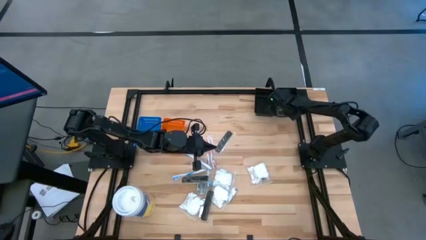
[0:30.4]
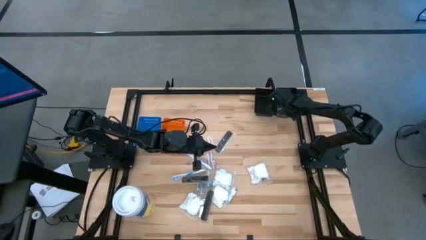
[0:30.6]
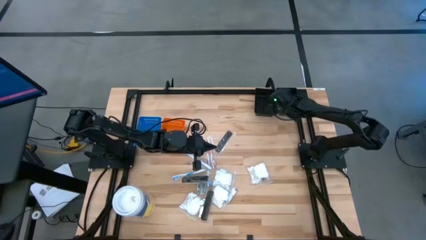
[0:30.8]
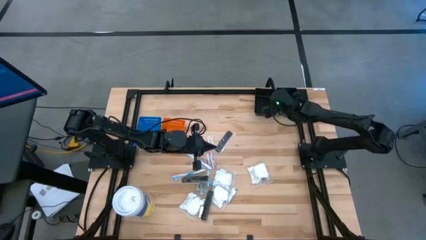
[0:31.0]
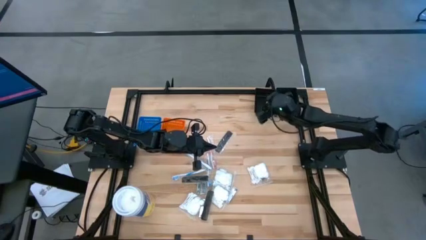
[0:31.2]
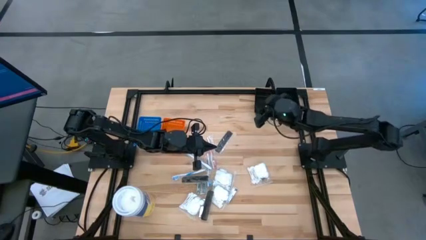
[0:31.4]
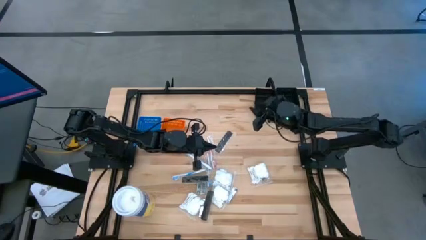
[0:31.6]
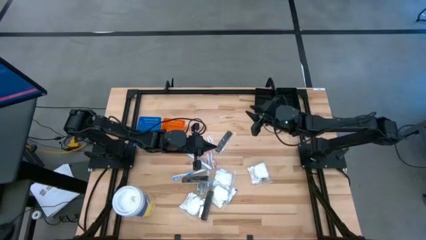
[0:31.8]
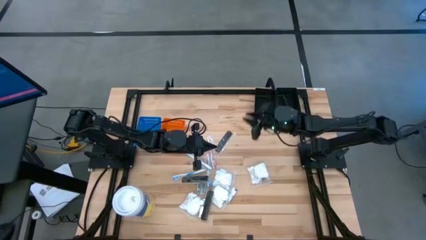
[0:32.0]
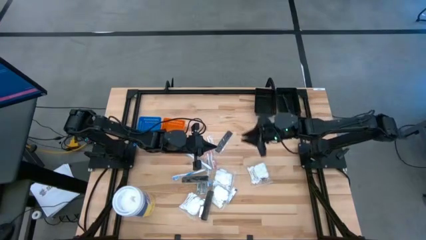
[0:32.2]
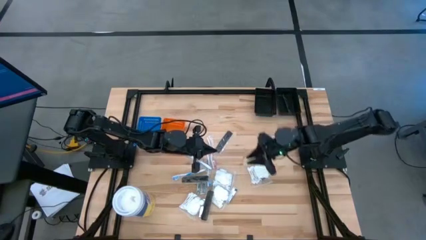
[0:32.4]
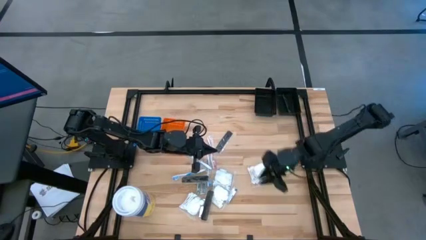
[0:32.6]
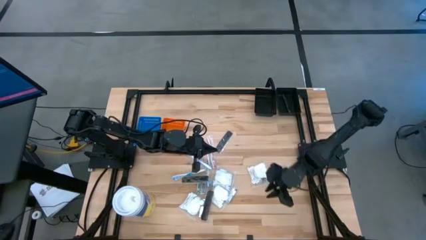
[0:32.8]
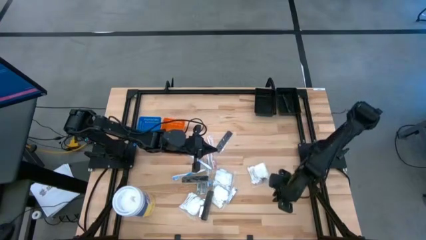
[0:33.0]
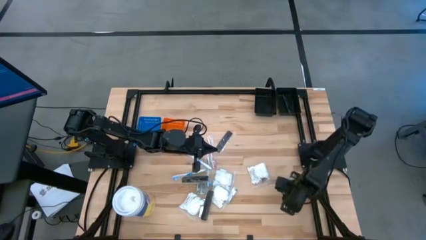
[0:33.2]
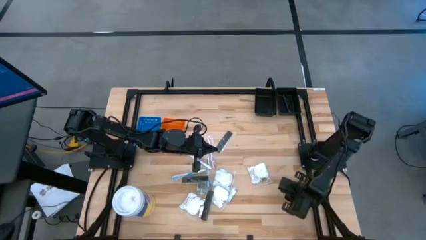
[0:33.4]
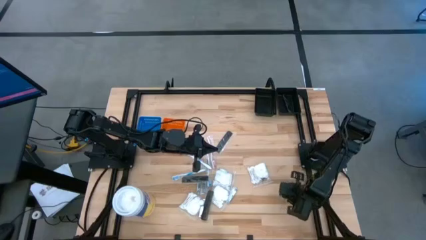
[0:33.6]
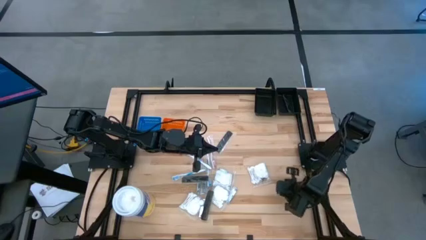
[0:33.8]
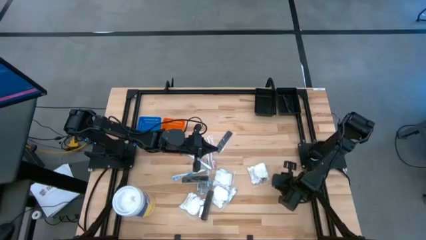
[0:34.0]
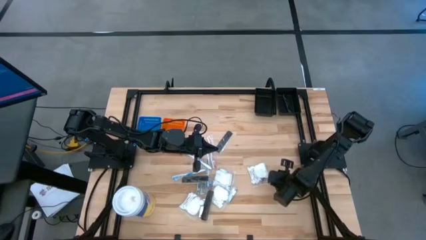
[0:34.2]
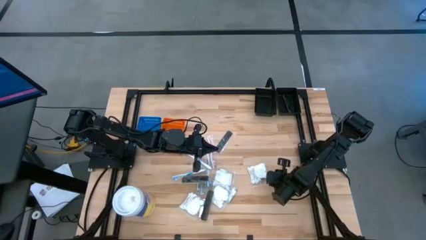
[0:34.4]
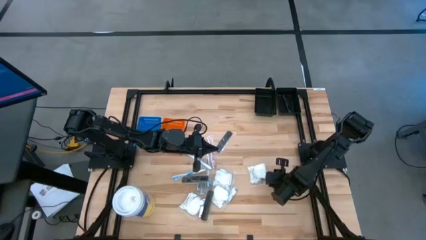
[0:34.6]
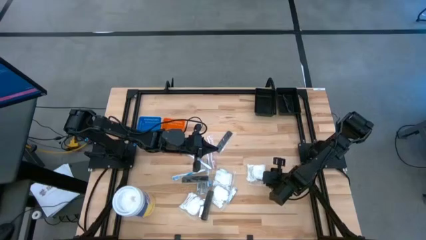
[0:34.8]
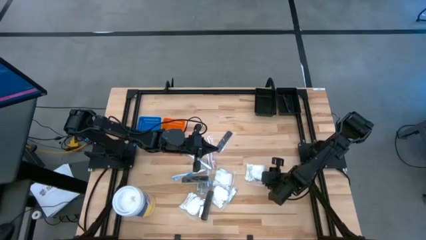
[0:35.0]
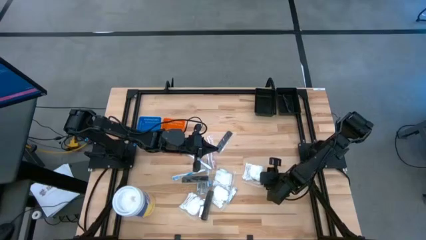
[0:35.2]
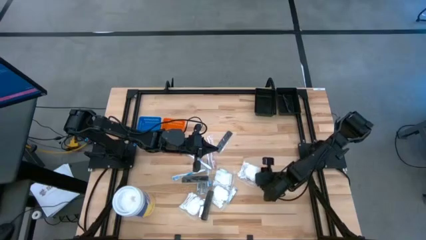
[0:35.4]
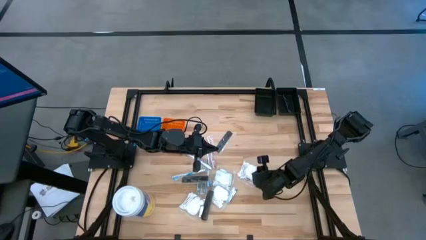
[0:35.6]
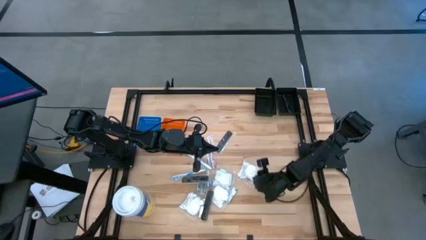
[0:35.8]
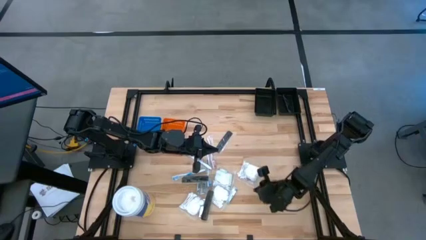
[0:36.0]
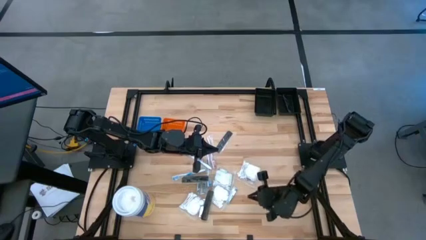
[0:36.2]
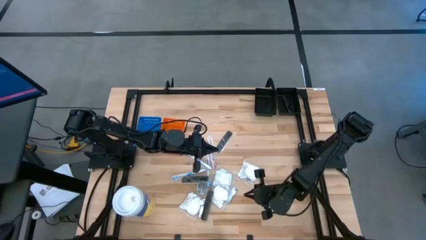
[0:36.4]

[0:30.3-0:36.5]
Task: Pick & Place Travel size toiletries
Put the cotton pack into the left black bin

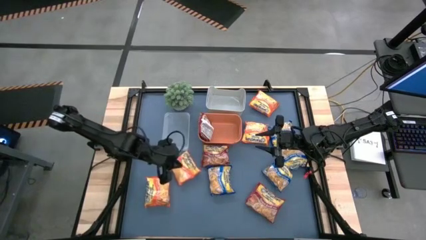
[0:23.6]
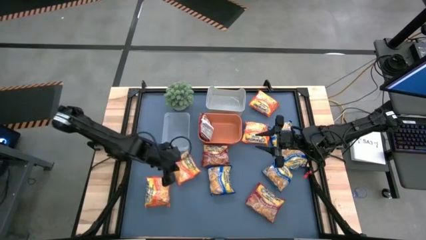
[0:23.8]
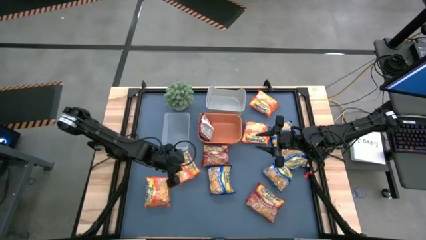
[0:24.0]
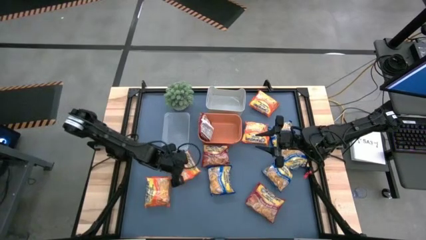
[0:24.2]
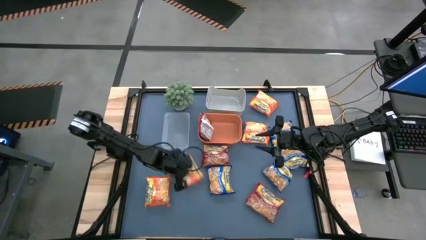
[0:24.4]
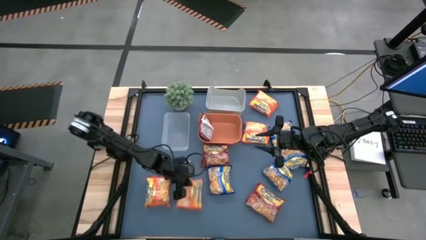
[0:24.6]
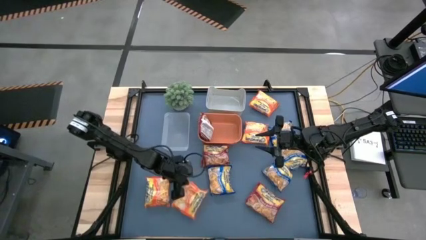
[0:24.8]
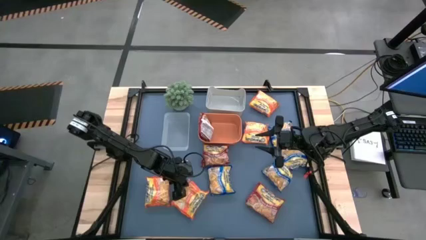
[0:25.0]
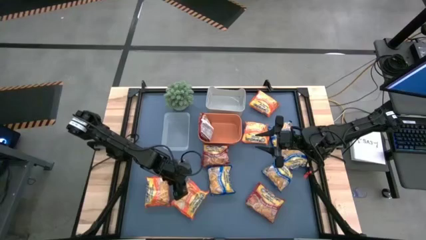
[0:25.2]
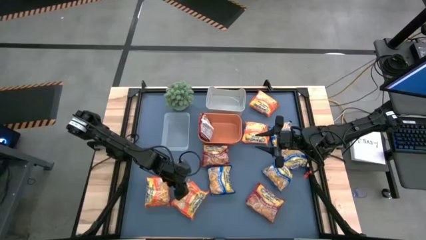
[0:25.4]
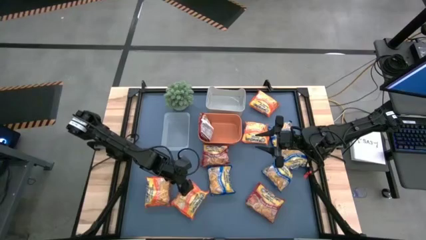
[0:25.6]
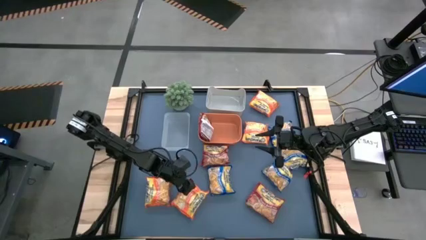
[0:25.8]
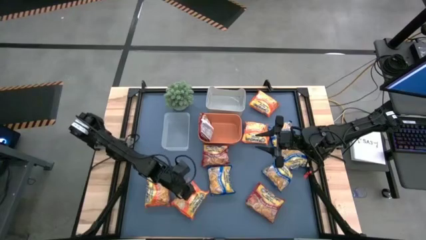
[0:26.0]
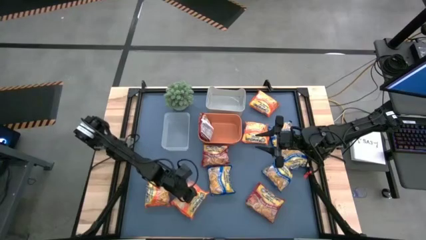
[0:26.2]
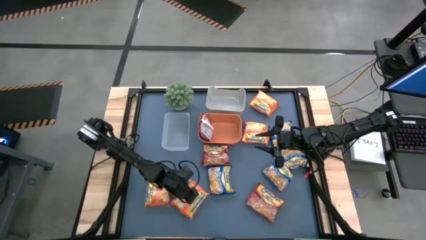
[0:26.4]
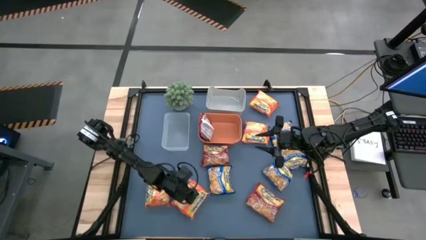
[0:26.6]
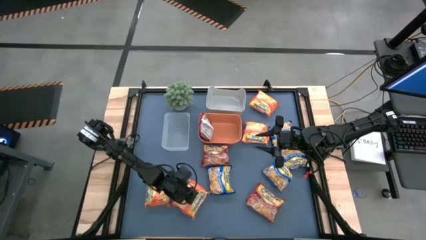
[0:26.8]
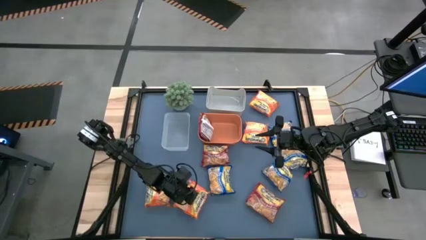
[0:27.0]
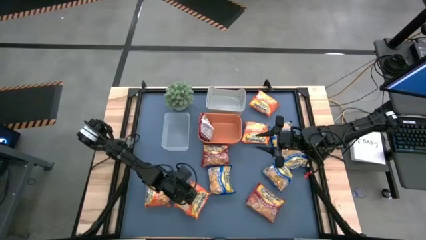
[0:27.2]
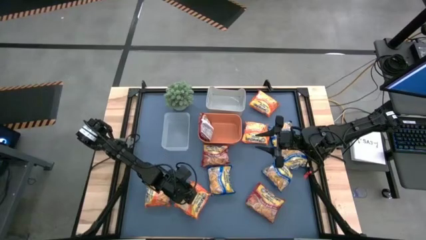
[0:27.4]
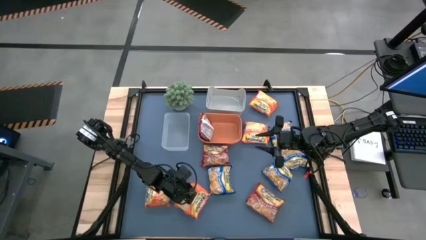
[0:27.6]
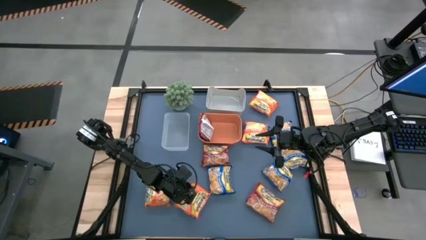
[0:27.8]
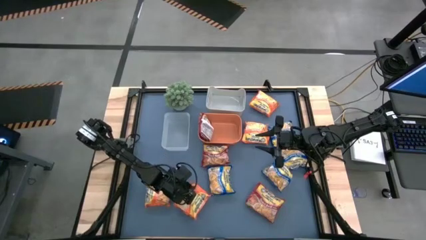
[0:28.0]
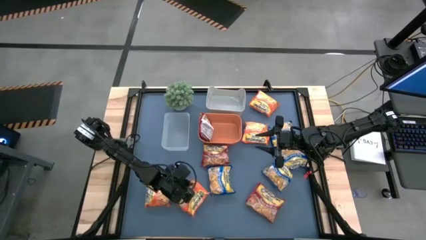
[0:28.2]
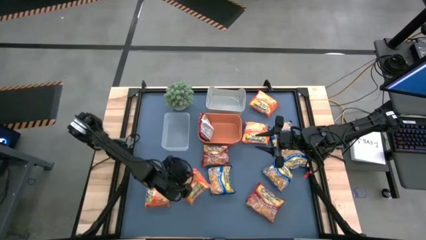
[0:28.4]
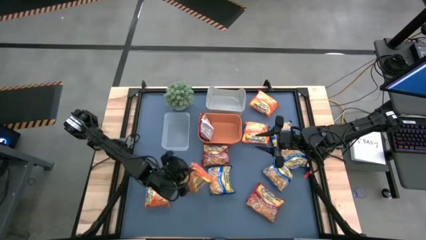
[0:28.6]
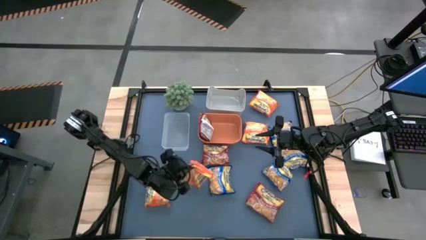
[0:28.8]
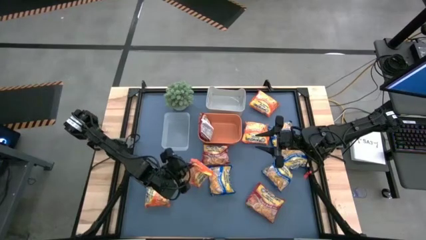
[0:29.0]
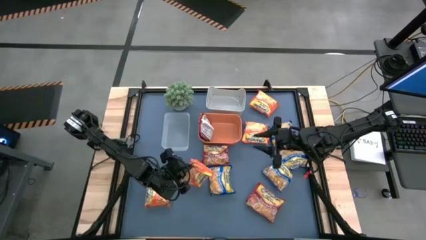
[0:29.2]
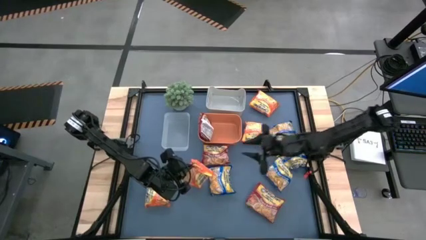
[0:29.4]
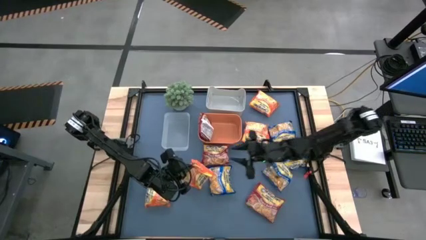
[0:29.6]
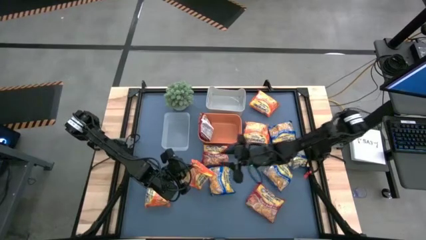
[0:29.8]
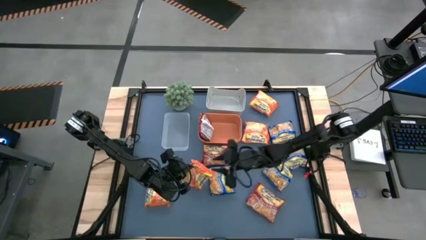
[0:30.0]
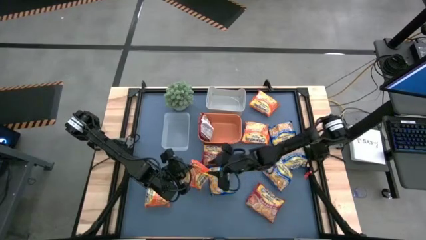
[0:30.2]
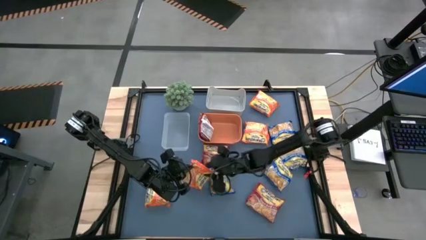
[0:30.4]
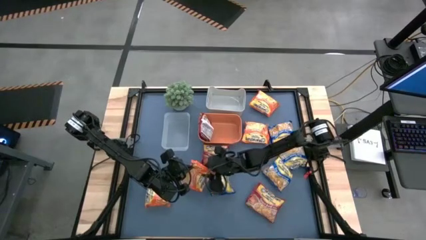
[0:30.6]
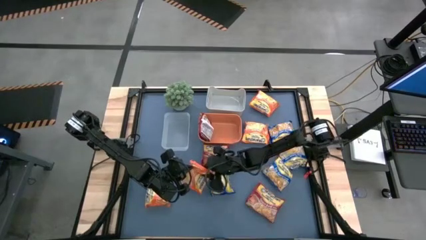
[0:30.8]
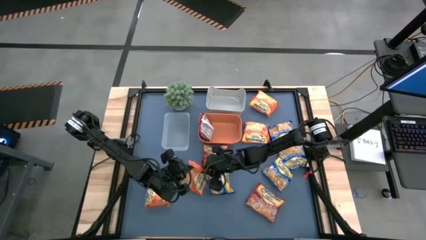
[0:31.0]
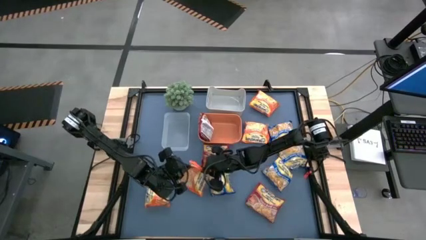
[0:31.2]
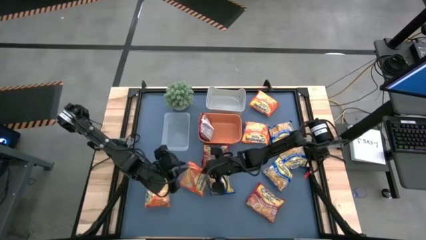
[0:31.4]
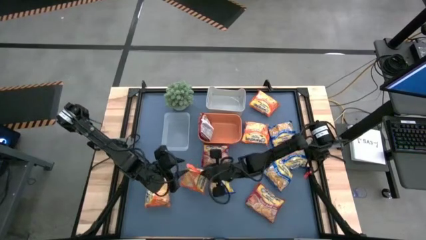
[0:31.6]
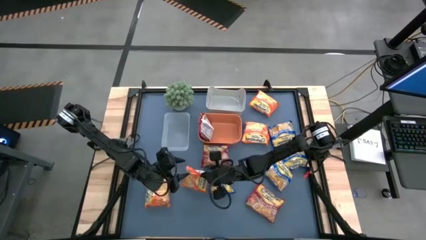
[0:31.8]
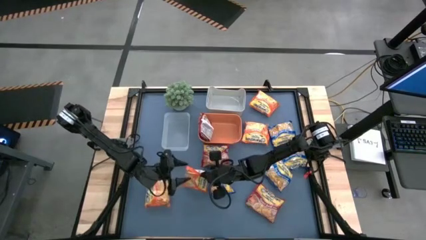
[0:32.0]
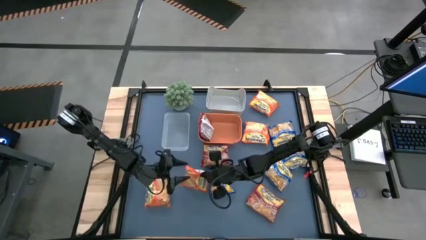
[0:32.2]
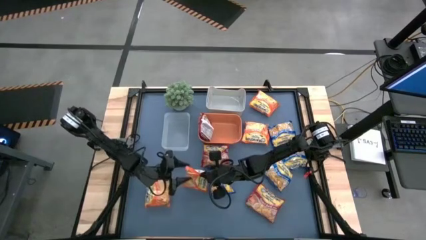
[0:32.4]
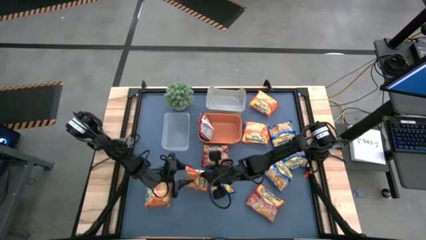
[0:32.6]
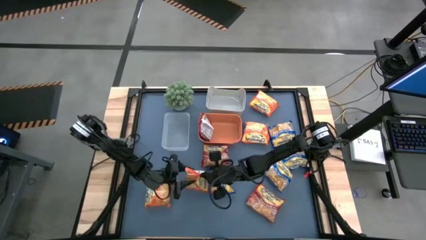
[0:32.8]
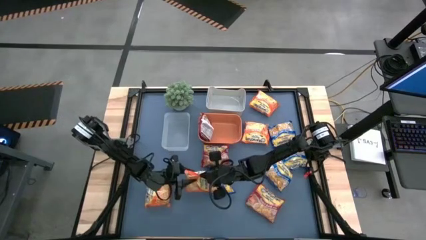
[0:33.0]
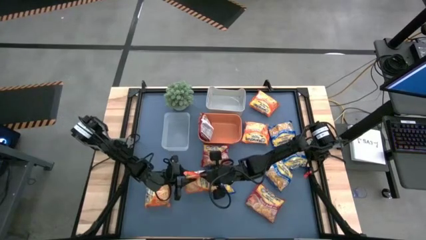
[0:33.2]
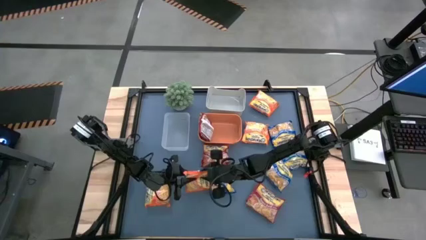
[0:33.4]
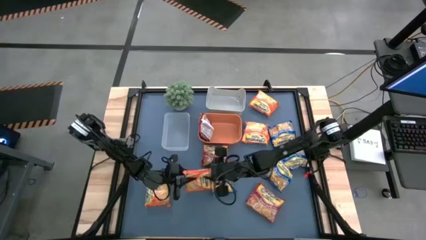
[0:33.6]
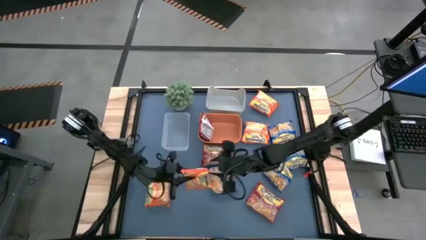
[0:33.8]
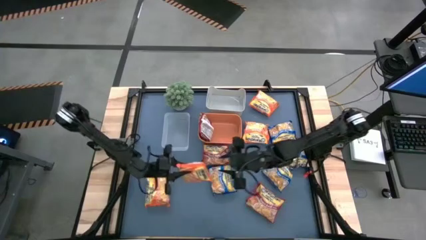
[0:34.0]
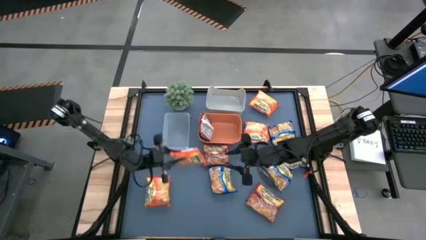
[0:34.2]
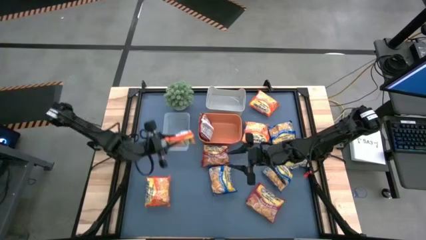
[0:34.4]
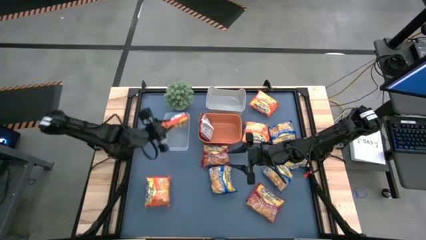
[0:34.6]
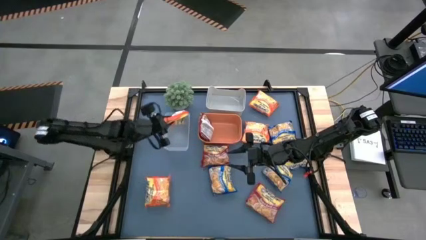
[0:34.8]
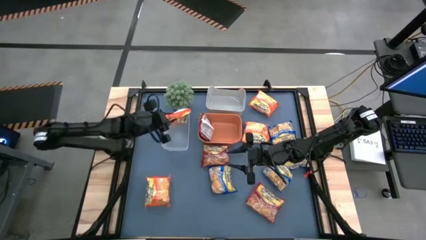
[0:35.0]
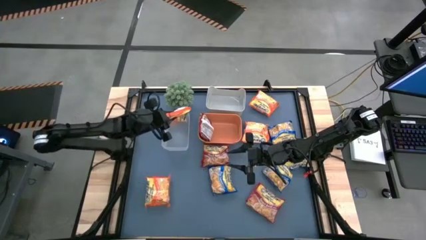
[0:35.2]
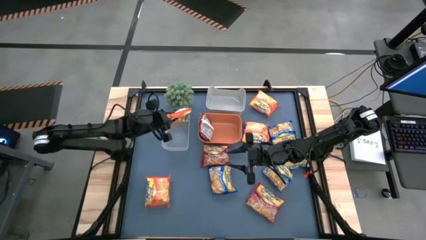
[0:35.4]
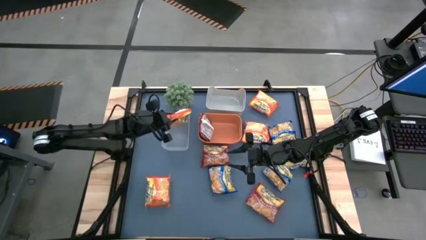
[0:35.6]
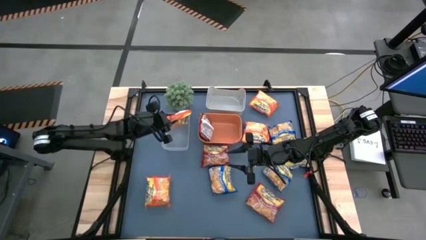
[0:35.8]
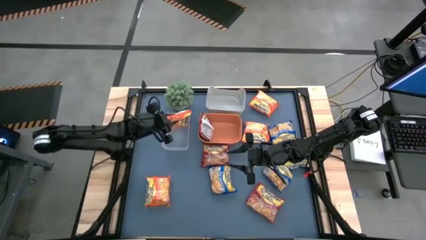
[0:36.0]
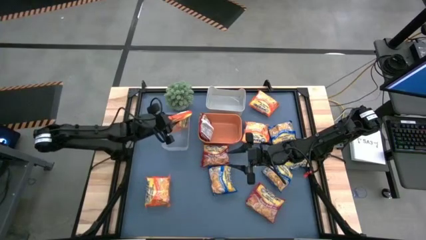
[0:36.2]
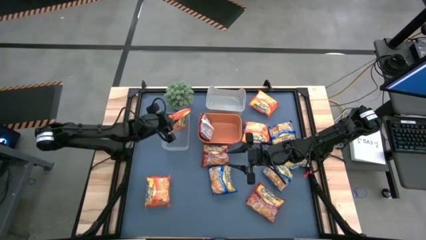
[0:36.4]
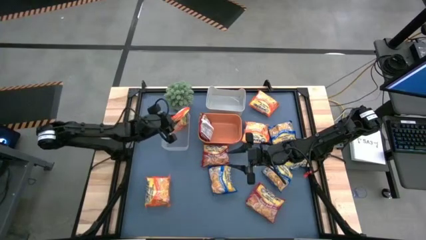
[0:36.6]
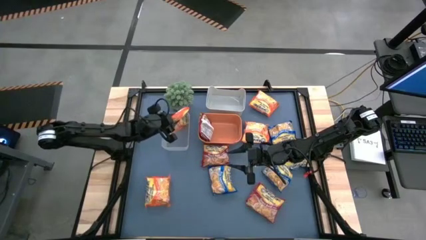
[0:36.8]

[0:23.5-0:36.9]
Task: Sort Maruchan noodles
Put the orange noodle pack into the transparent bin
